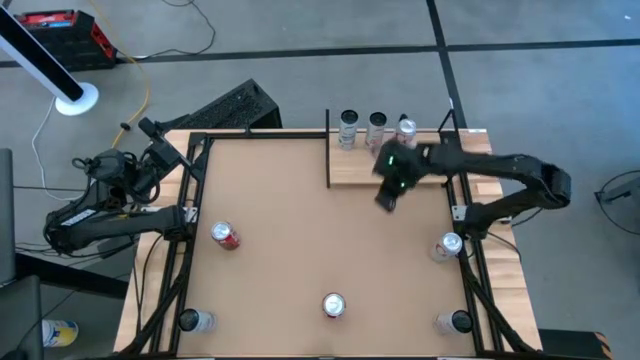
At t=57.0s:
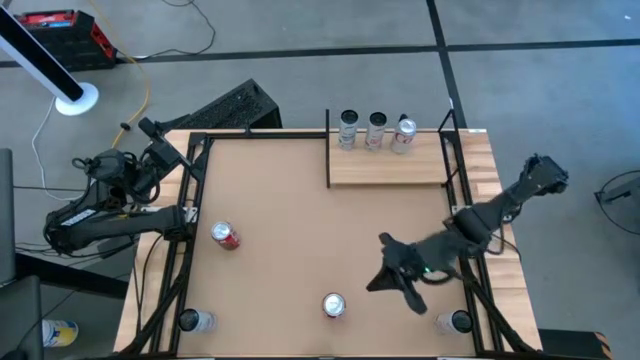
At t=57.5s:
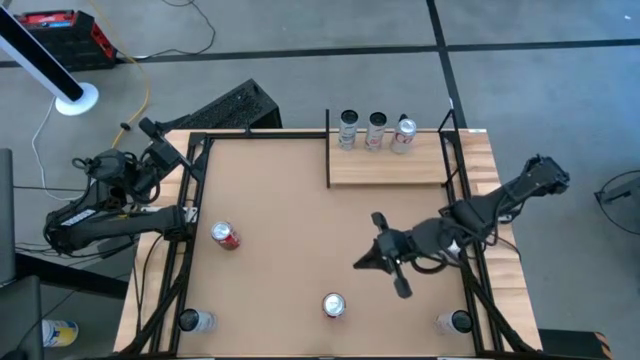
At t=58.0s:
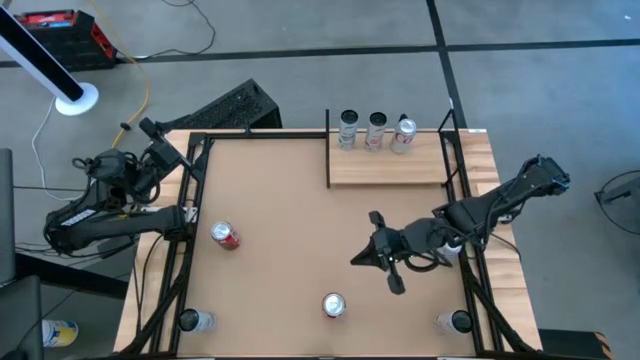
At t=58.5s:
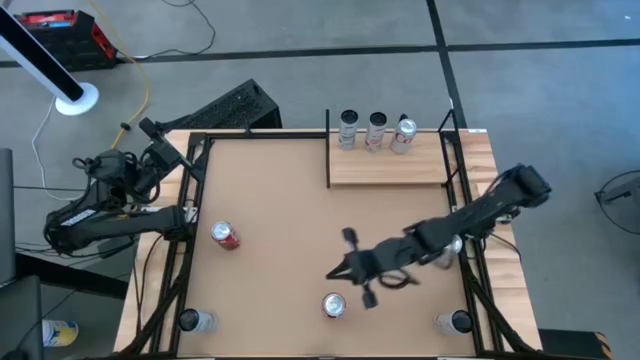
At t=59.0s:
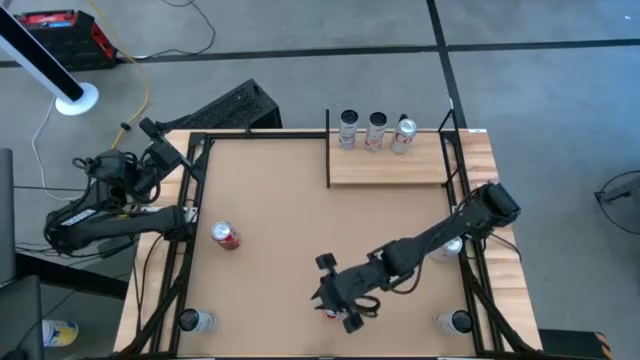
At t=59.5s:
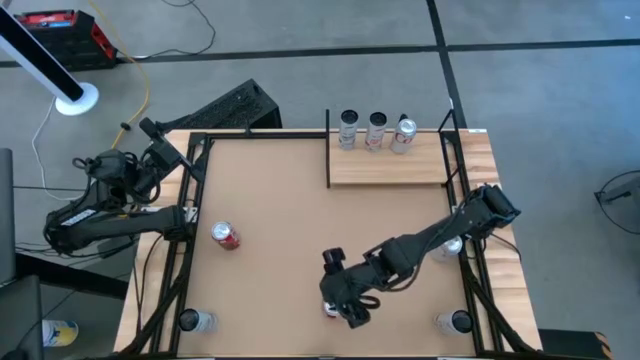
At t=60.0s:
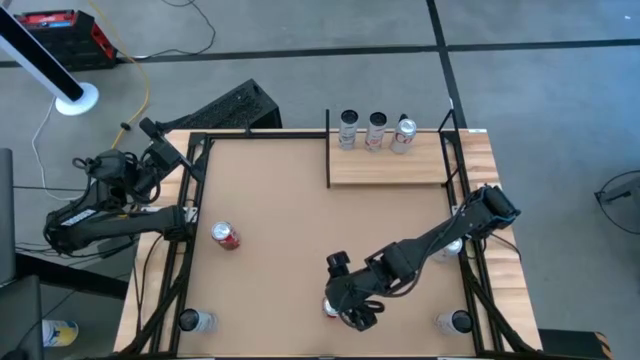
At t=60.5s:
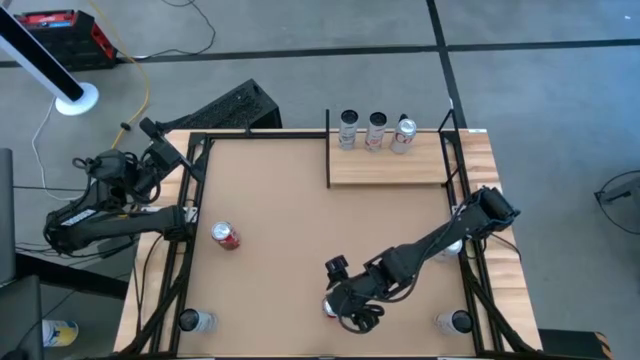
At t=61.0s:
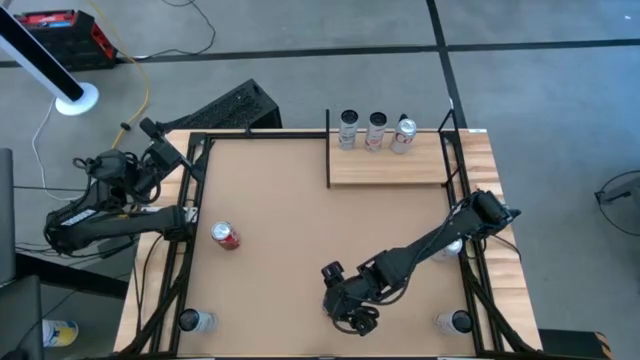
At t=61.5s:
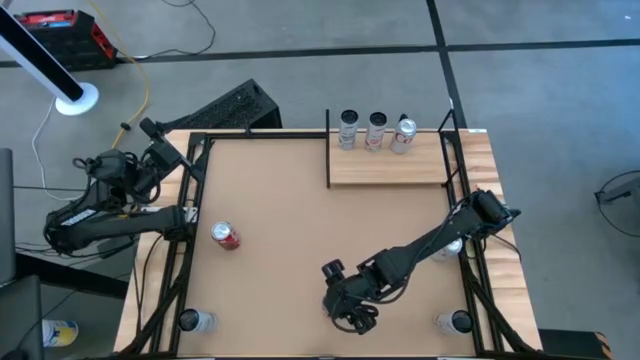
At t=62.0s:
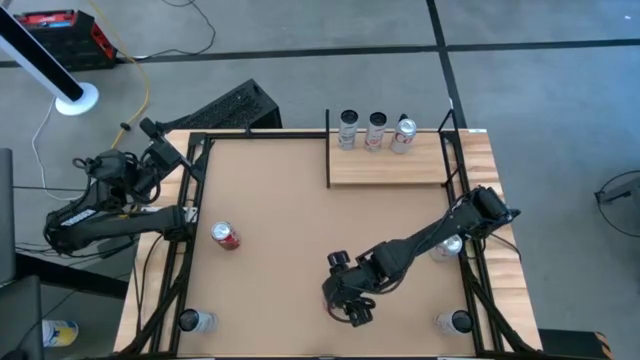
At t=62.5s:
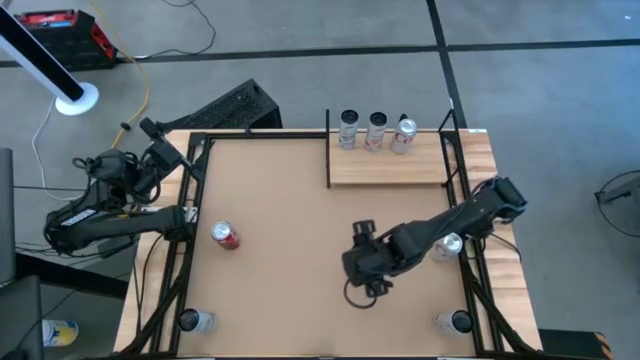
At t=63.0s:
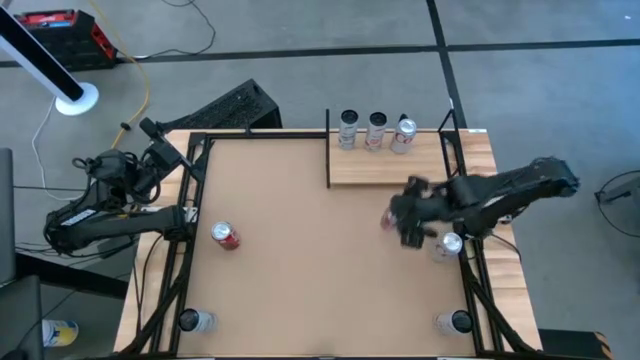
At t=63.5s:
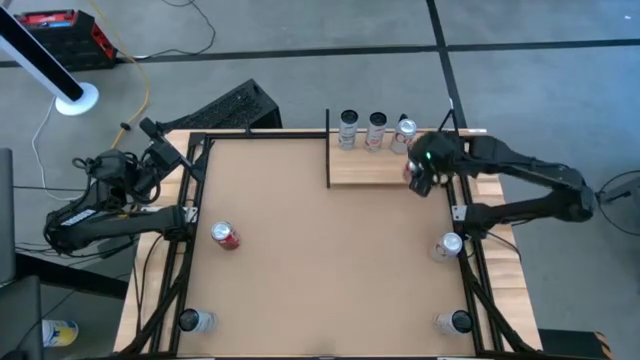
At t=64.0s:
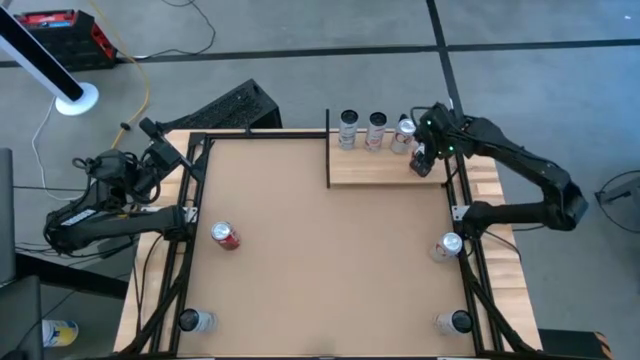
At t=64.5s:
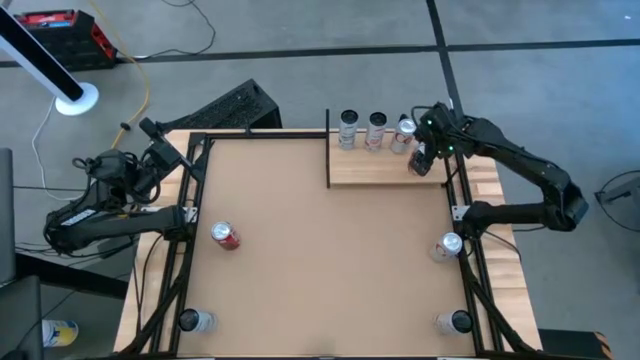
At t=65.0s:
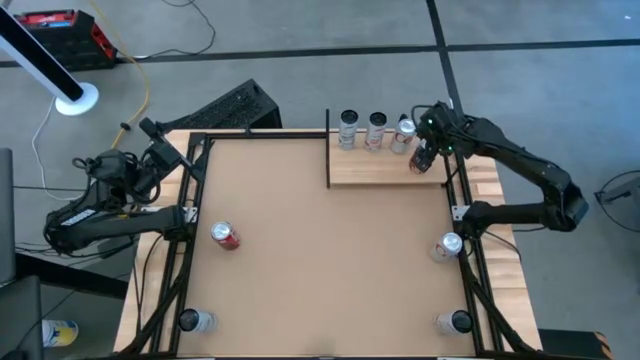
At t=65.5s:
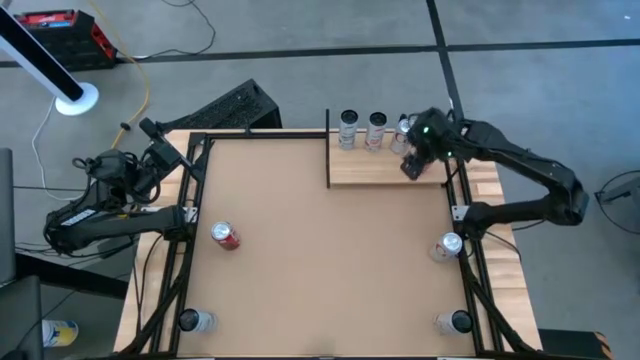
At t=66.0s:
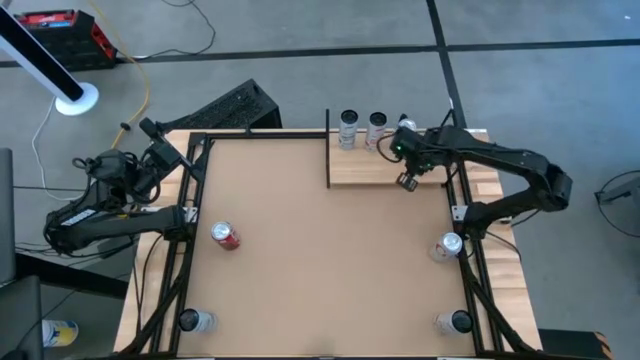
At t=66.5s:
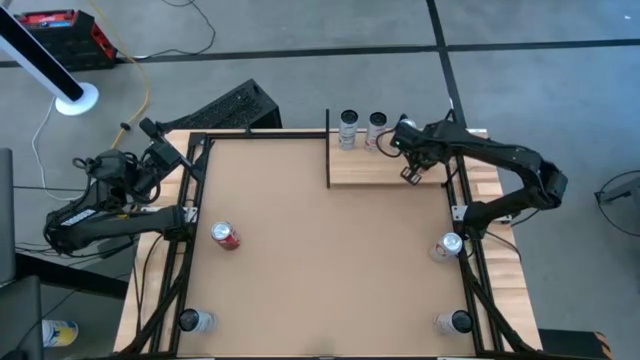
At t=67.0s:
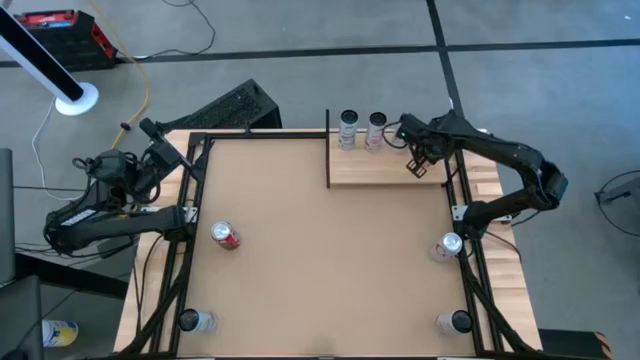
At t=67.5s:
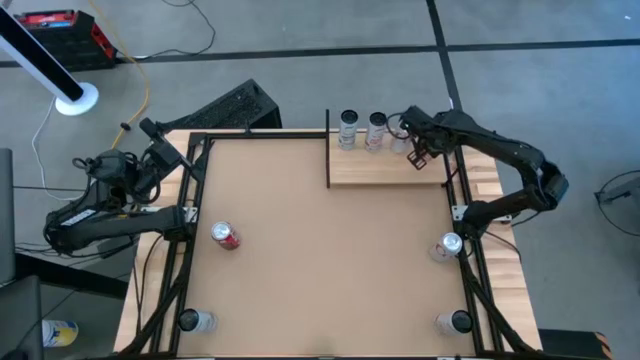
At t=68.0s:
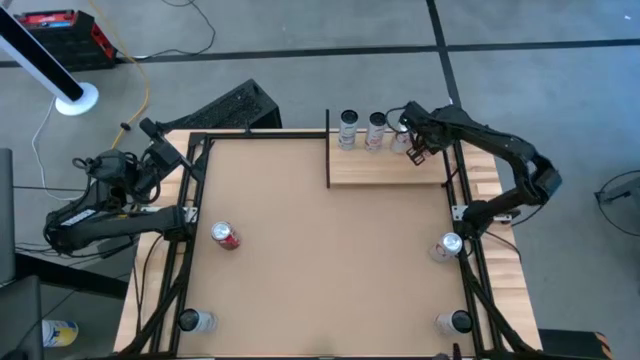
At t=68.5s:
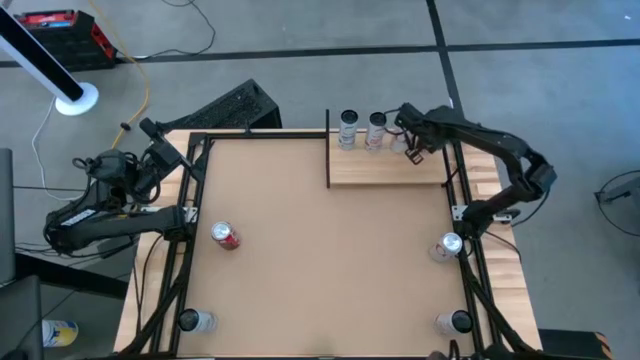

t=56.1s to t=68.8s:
Task: Place canned beverage on shelf
Put the bottom red-white soda can on the shelf

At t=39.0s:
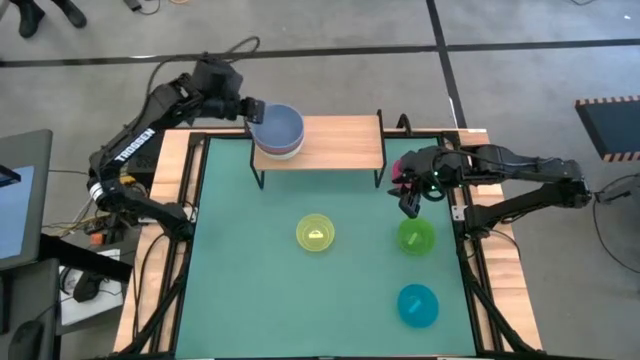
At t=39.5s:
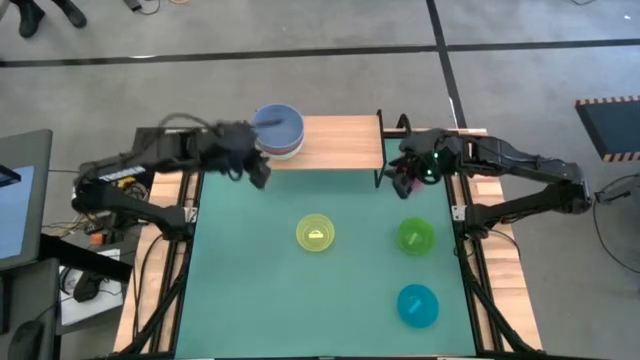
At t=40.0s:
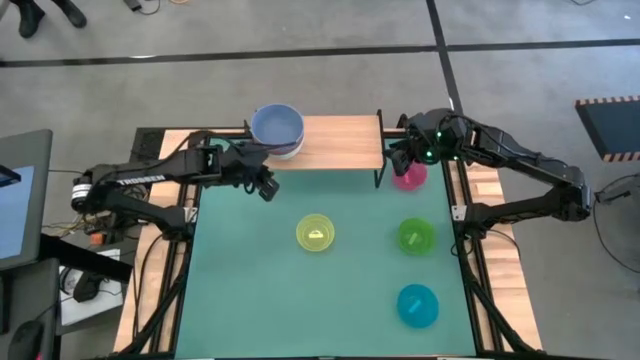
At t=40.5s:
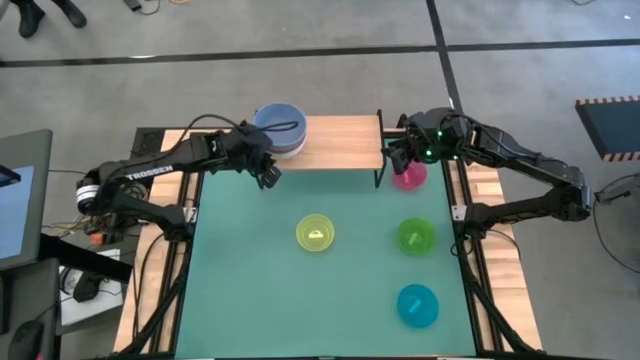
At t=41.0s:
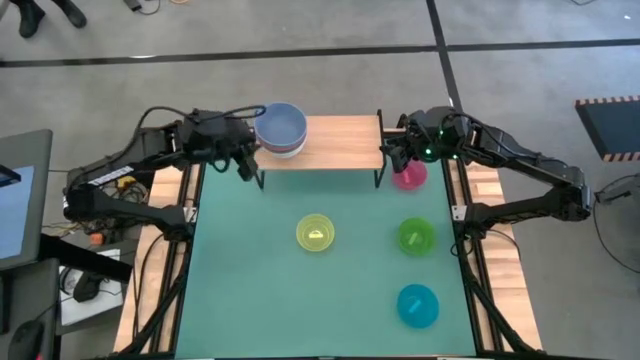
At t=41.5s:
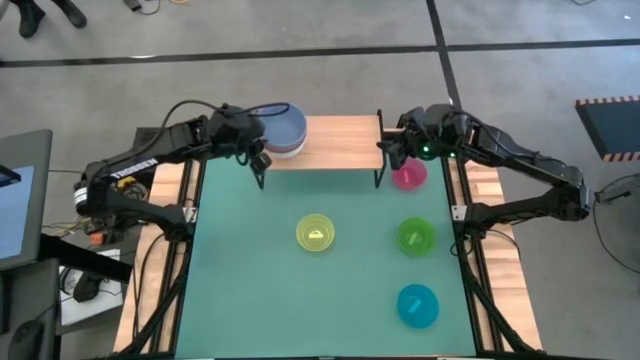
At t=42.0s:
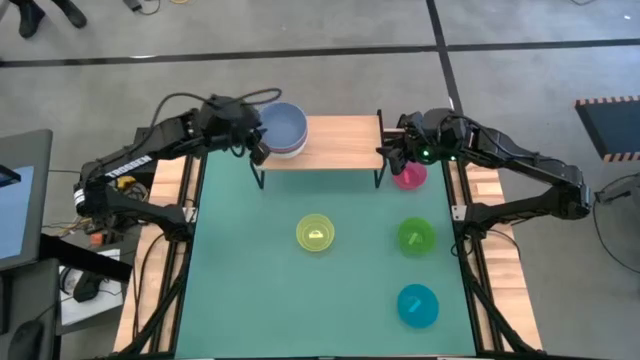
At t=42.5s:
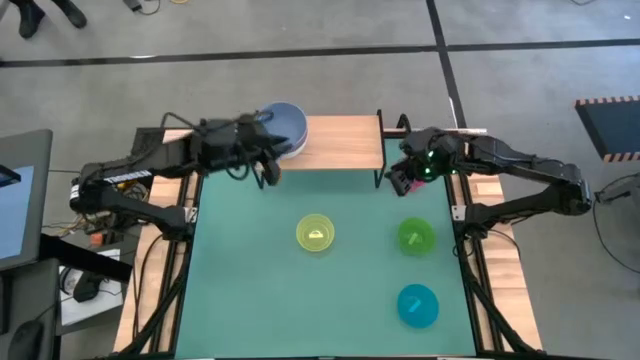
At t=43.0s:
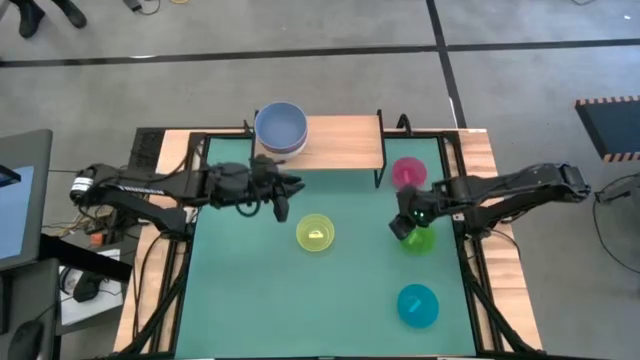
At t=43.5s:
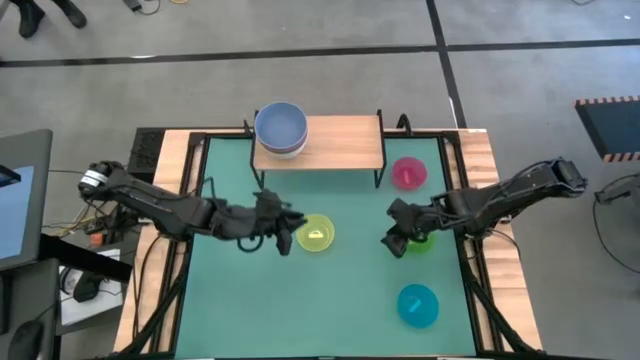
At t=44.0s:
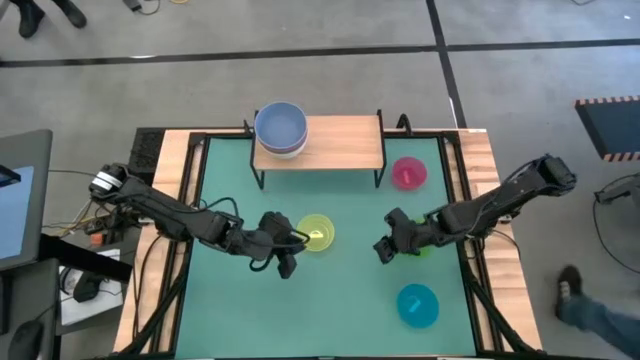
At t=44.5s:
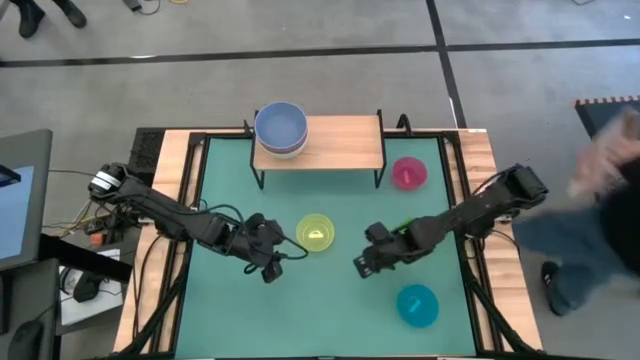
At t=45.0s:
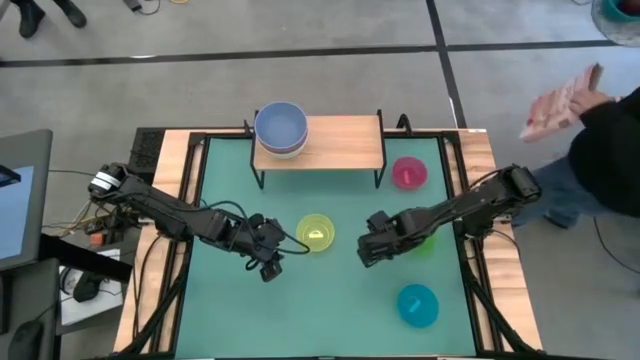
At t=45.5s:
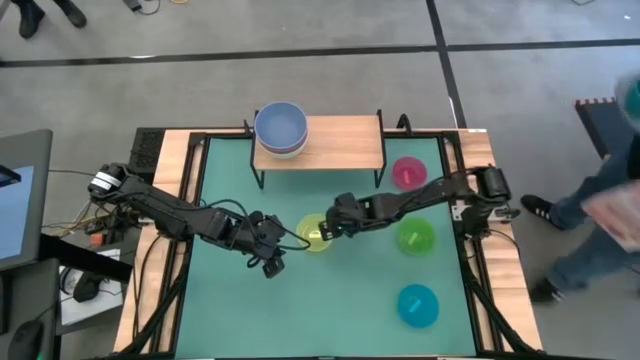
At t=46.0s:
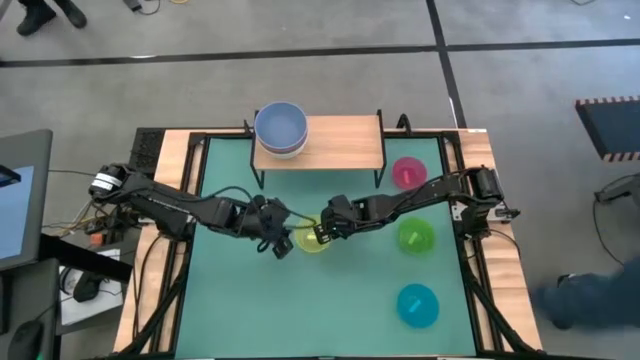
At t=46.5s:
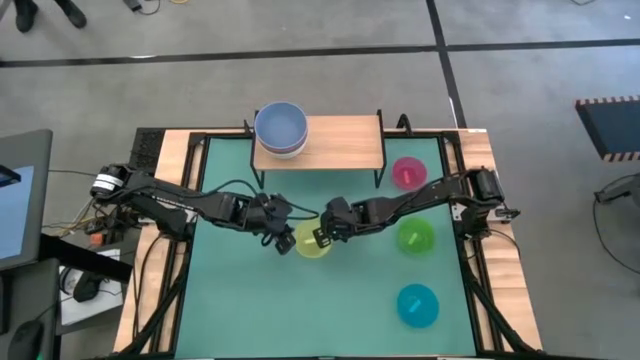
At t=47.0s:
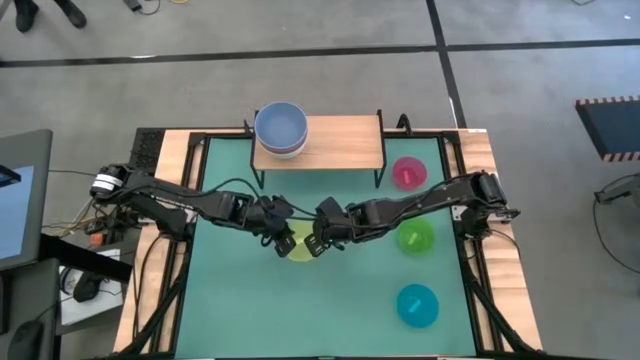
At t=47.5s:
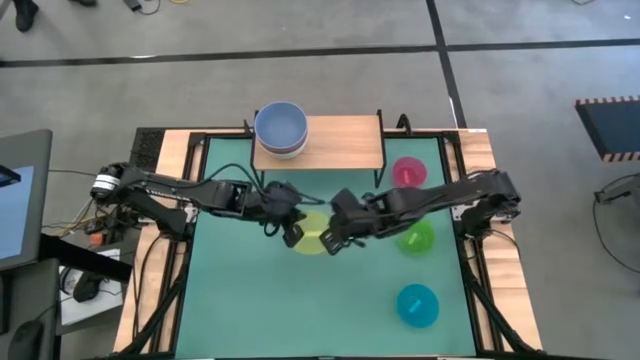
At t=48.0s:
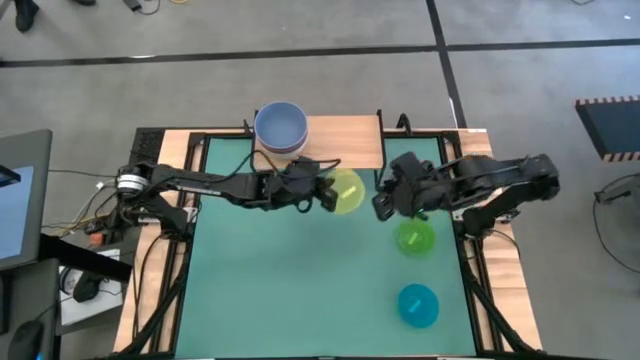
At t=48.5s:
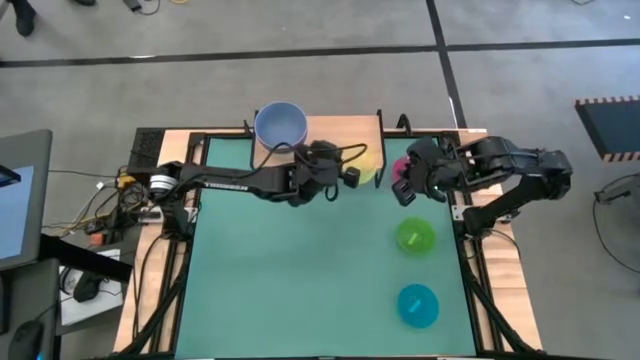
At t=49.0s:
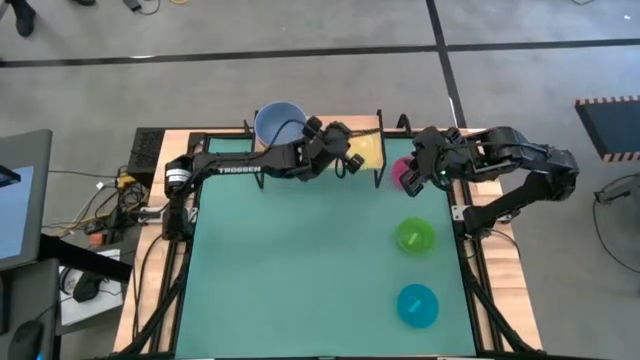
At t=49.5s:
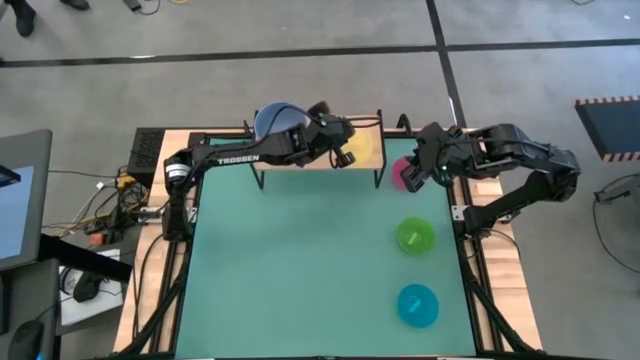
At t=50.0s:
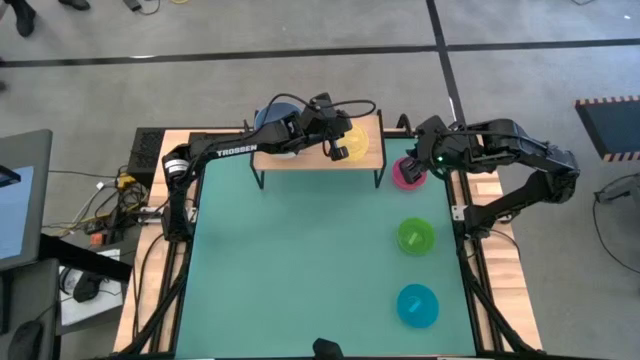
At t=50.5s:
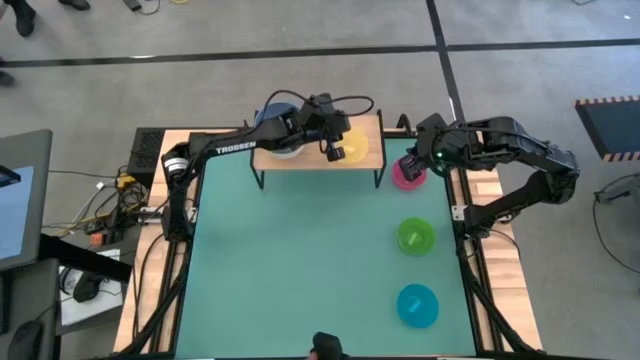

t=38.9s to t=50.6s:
Task: Place and stack bowls onto a shelf
Put the small yellow bowl on the shelf
